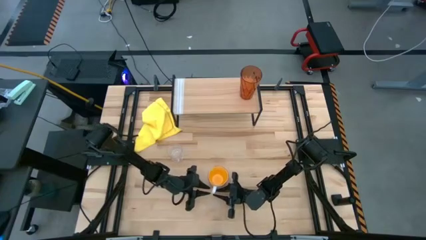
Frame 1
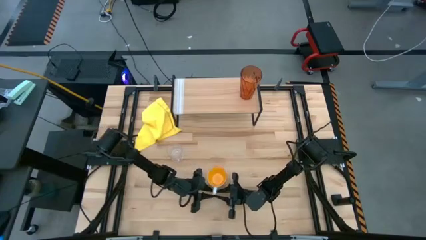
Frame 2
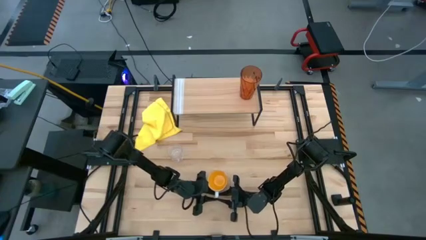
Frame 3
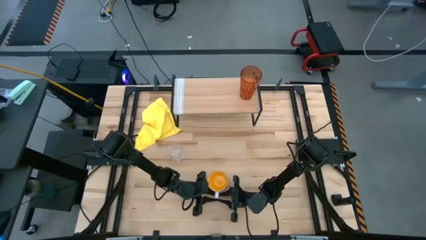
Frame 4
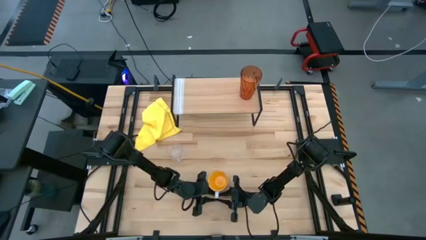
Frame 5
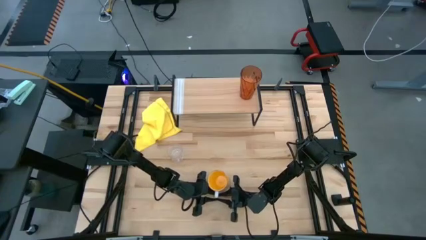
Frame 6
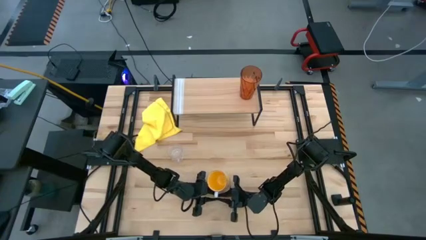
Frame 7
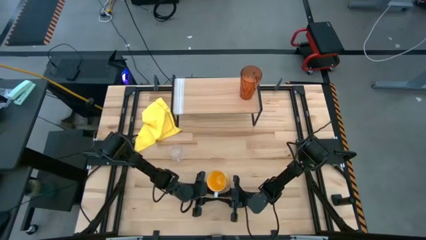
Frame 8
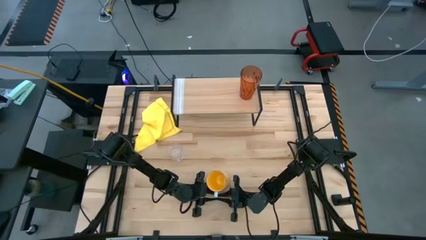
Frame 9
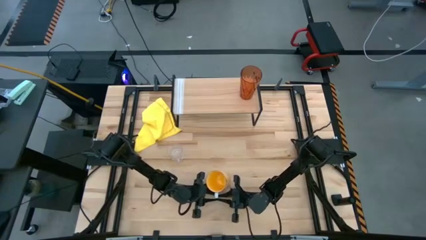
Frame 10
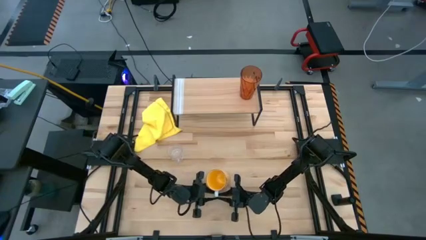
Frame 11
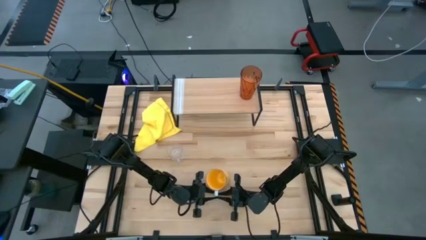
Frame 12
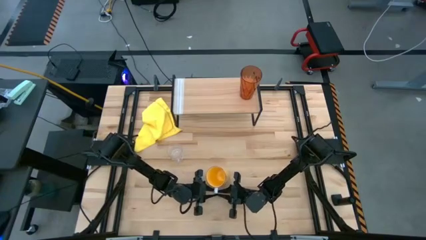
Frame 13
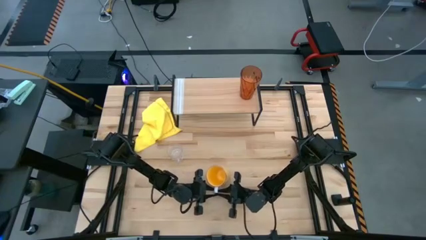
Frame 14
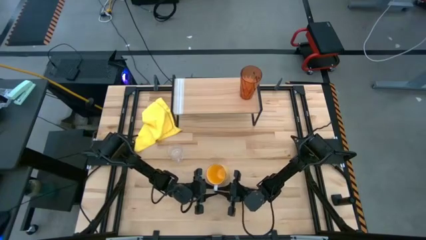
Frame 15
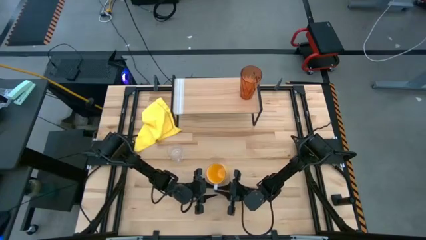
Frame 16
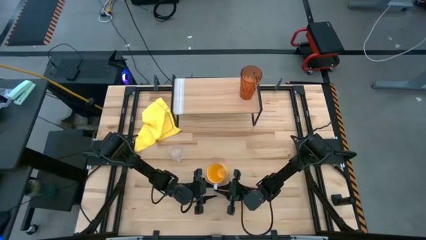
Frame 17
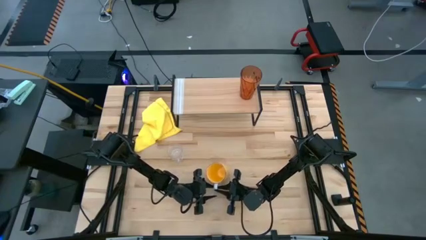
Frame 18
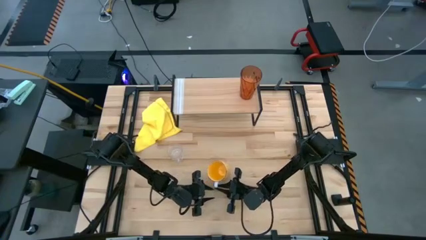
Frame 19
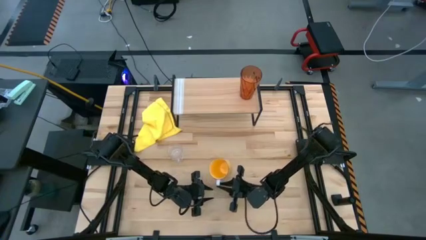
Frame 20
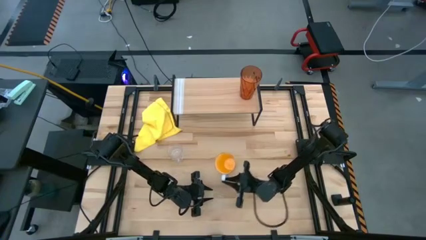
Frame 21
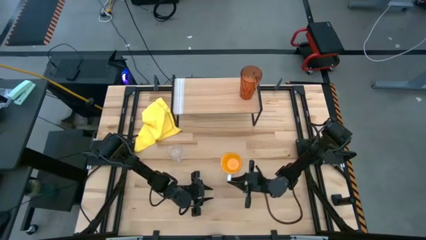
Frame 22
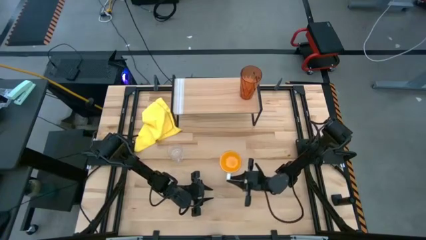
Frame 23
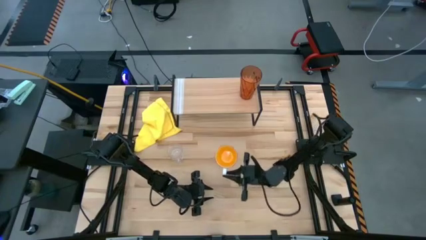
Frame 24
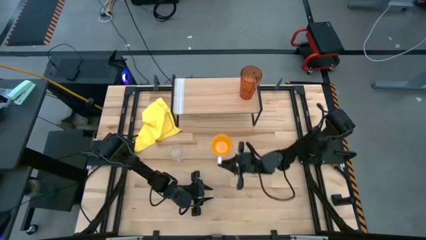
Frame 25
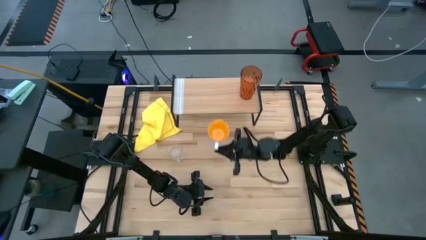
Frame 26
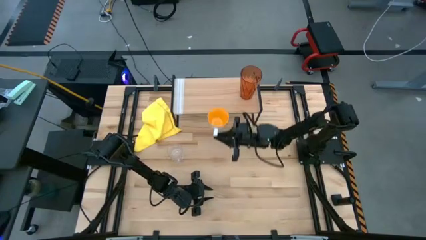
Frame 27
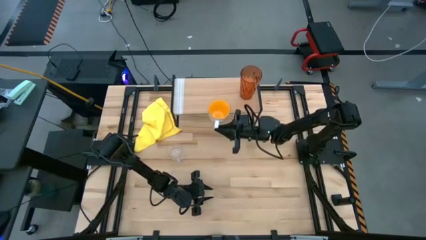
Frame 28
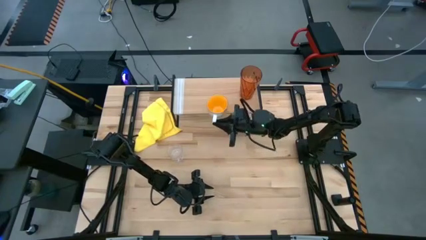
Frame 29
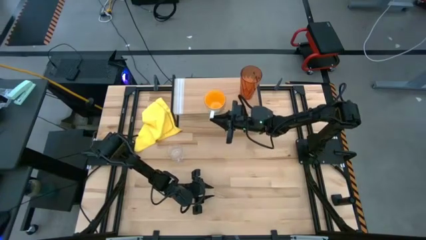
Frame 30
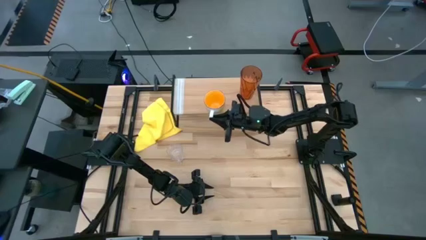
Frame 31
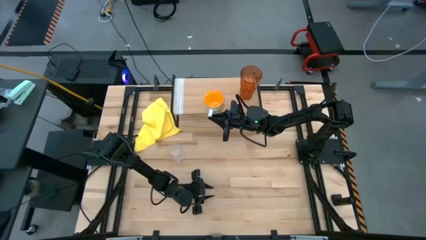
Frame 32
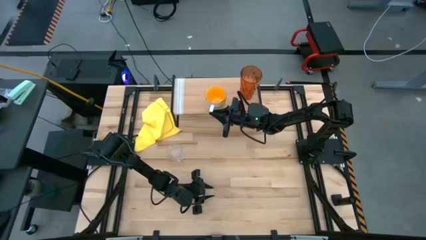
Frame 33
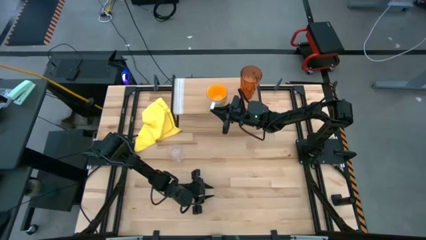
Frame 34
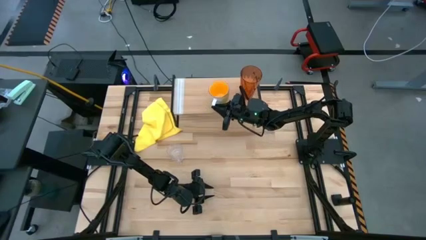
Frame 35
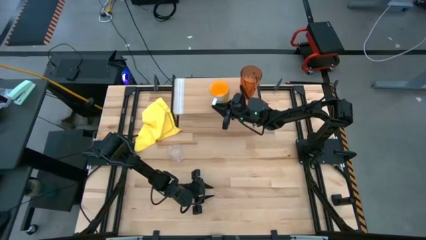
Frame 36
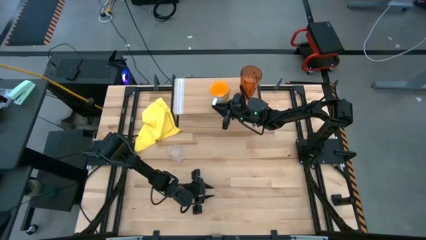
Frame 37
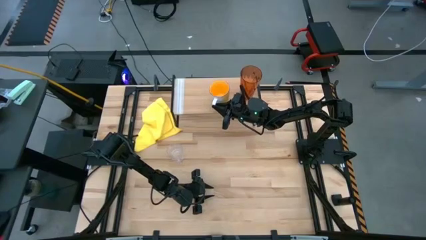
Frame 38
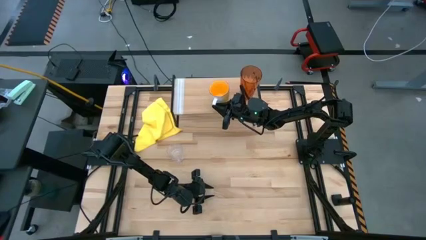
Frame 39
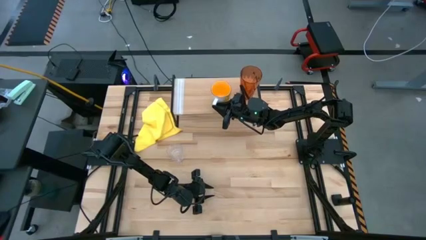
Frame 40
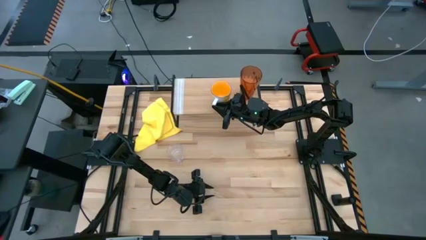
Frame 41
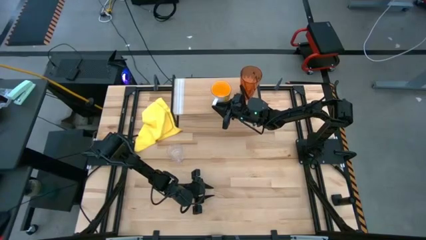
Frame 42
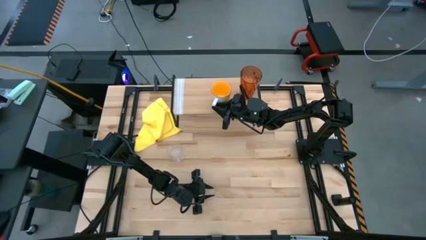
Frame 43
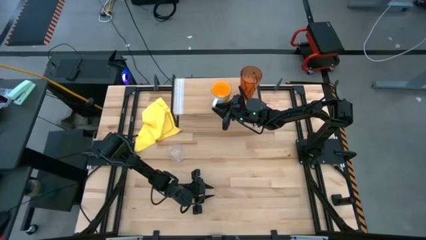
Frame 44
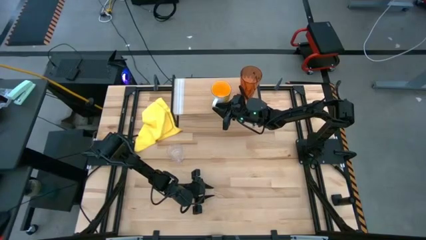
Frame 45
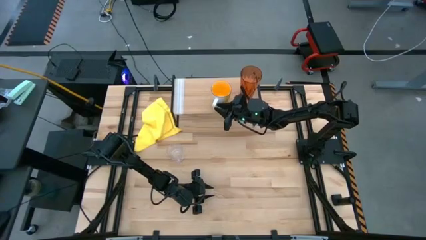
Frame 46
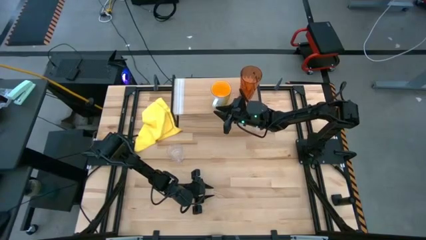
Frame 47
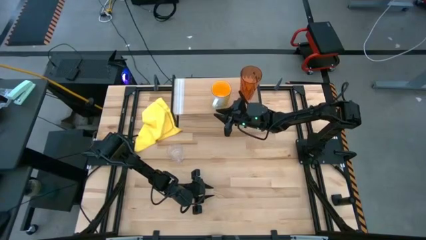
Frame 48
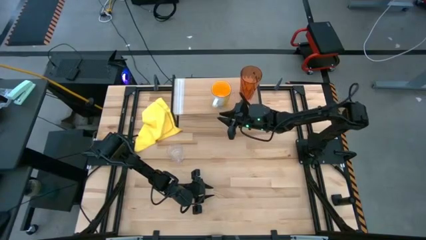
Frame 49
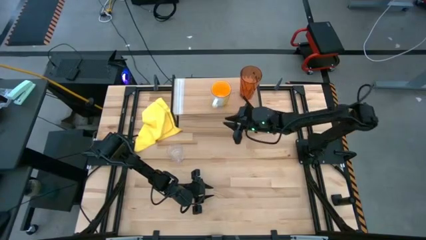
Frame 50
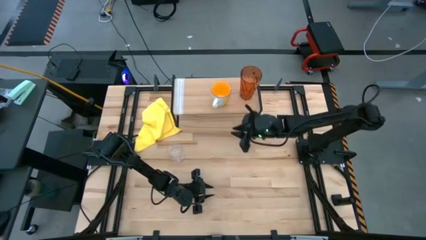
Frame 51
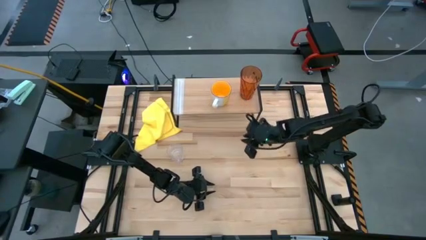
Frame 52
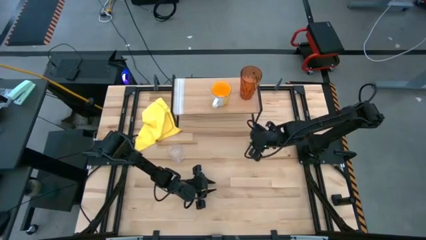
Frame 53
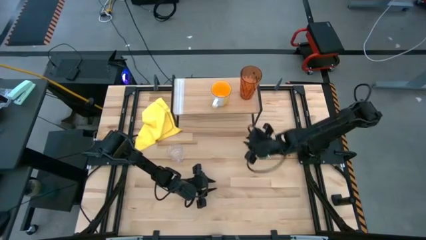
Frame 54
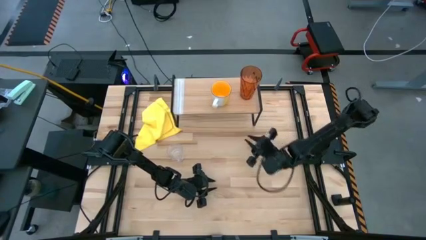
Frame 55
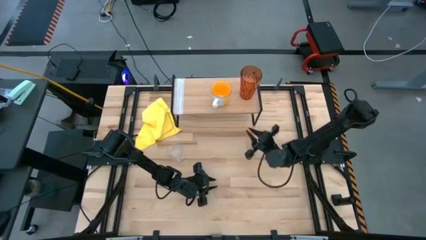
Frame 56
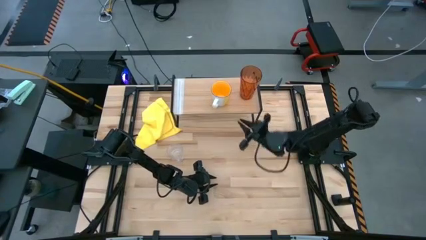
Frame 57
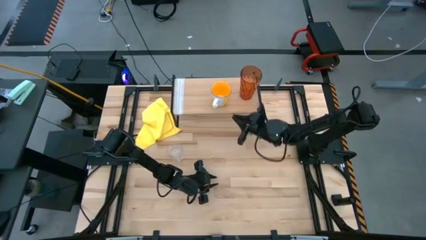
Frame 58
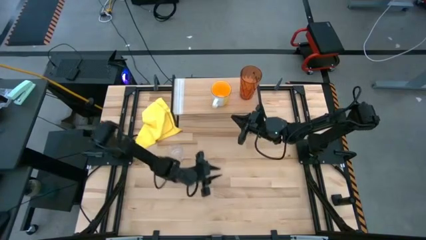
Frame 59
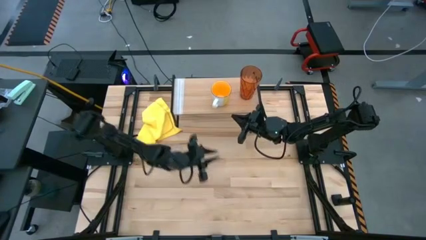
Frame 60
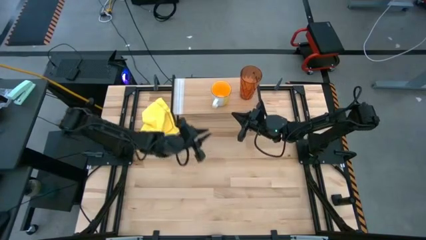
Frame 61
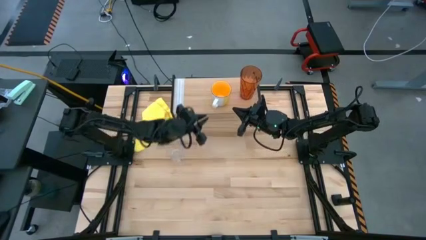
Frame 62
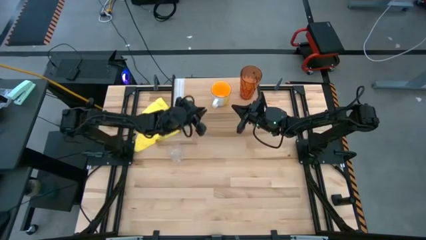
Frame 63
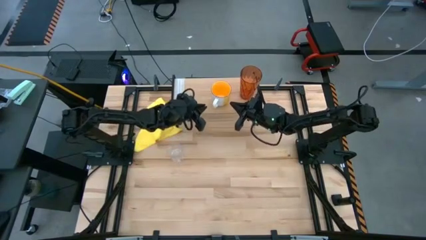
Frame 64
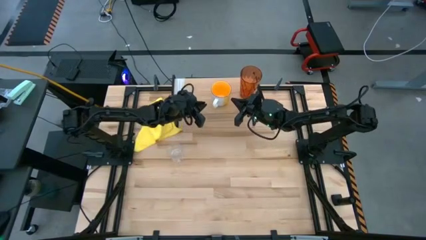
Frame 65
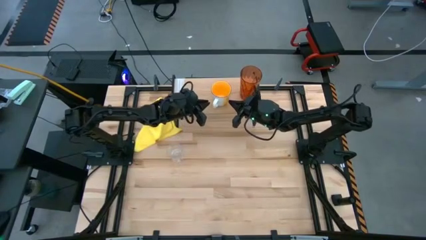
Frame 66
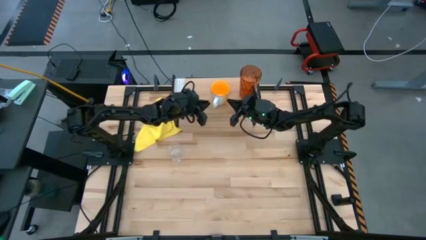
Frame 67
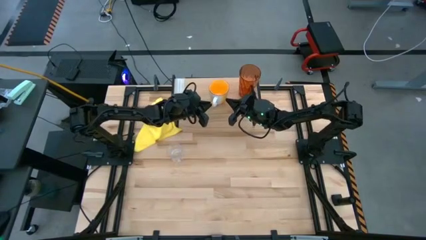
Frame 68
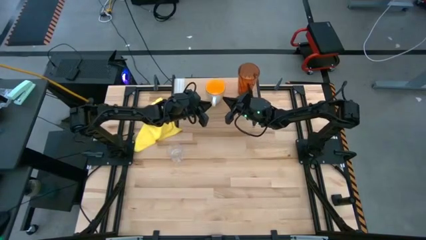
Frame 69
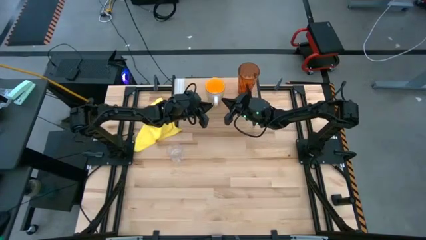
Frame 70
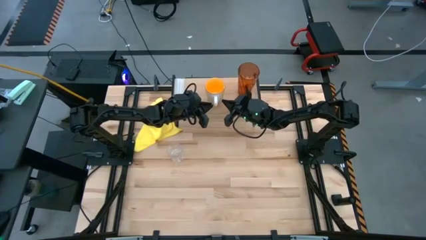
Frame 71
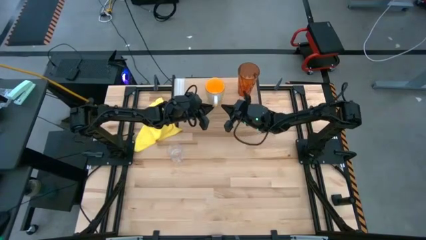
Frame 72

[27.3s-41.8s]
Task: Stack small to large cups/mugs on shelf
Put the yellow mug on the shelf

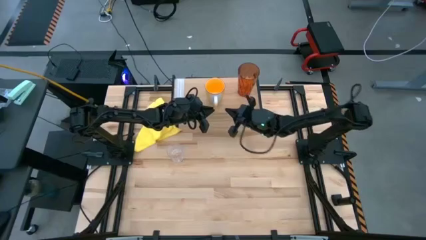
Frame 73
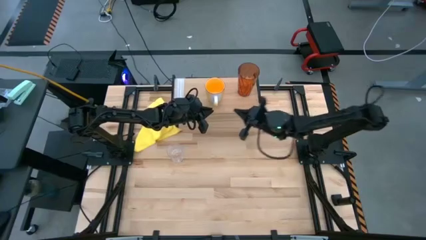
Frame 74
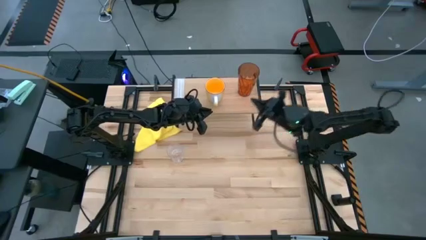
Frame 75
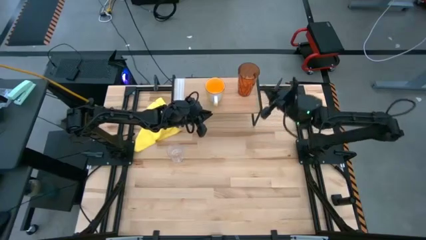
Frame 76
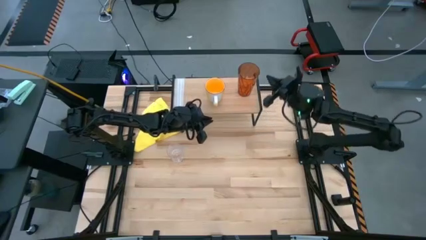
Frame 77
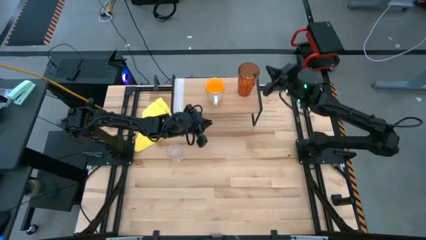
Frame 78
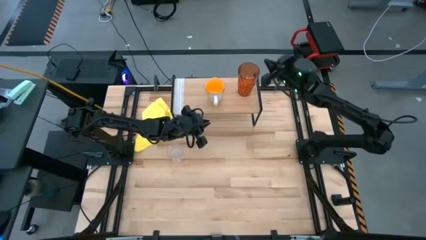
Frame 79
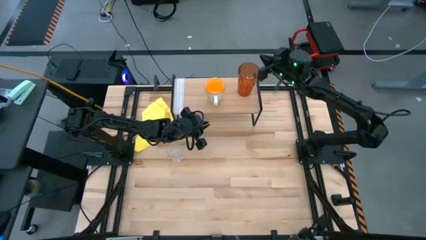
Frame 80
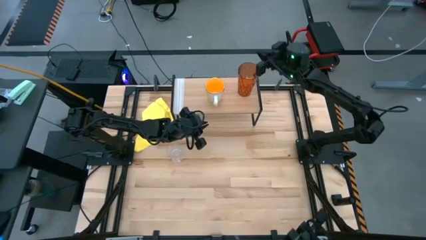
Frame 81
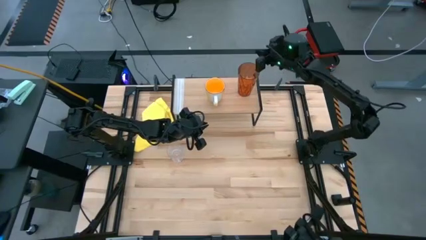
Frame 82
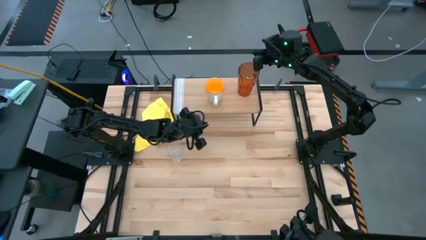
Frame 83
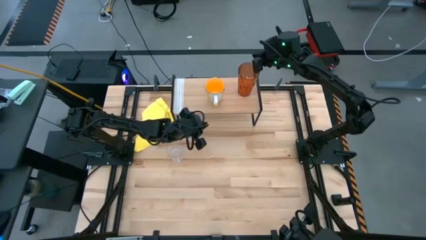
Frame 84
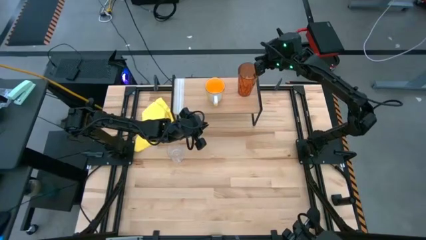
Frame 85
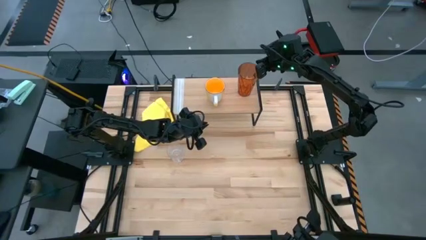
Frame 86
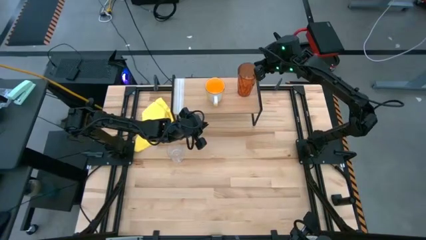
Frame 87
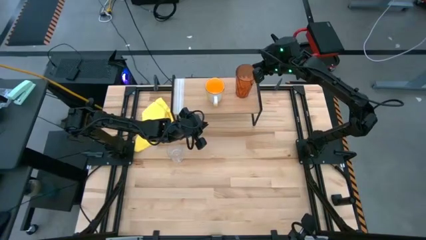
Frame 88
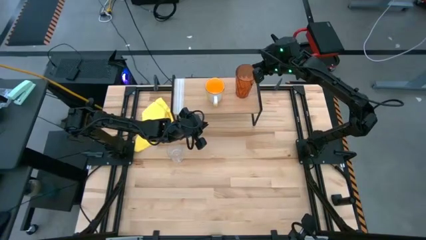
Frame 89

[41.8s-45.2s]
Adjust the brown glass on the shelf

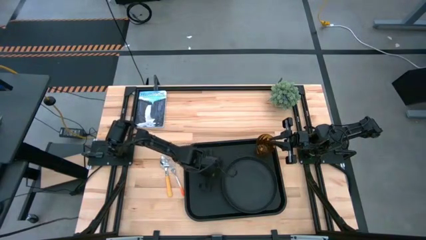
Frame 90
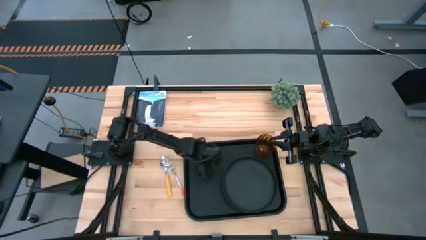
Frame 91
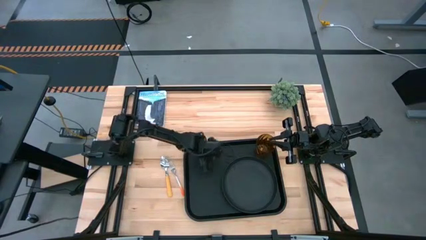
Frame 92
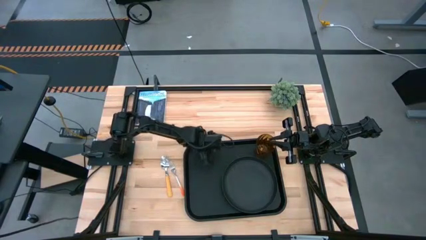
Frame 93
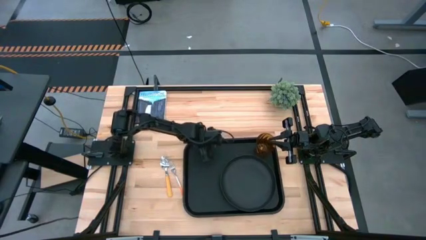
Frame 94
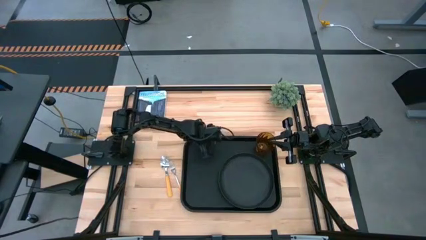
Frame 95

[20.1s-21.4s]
Task: Pick and place plate/cup/fork/spoon on tray
Move the black serving tray to the top
